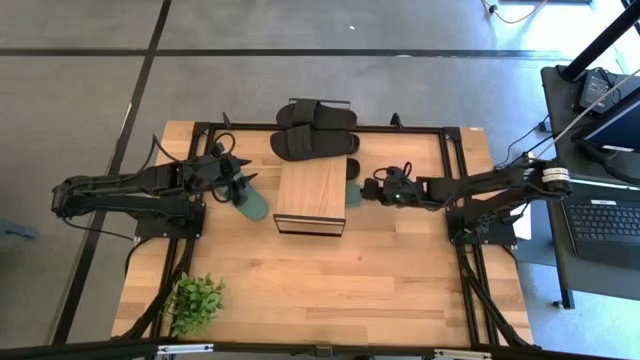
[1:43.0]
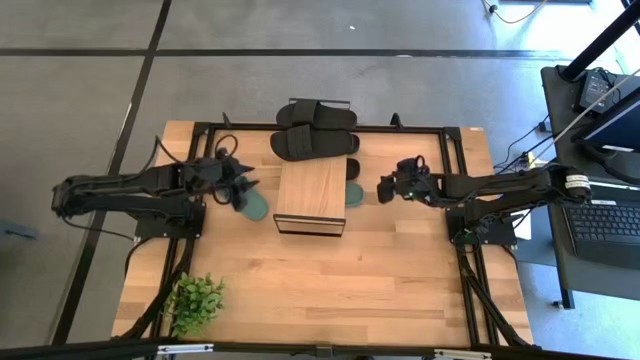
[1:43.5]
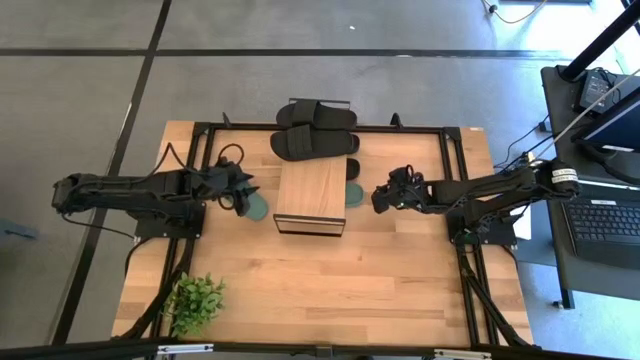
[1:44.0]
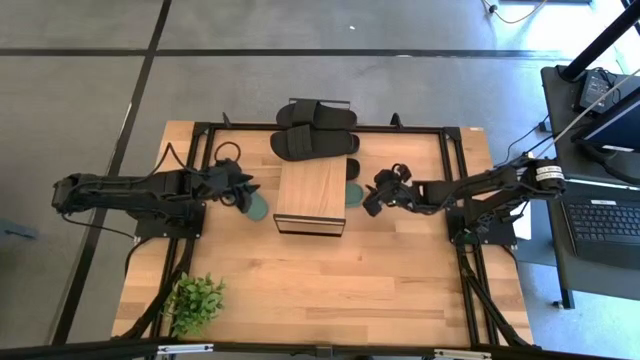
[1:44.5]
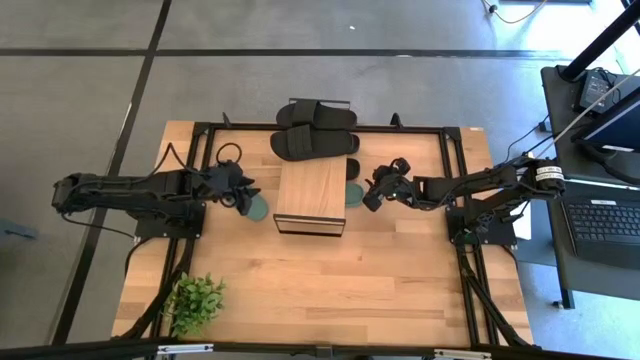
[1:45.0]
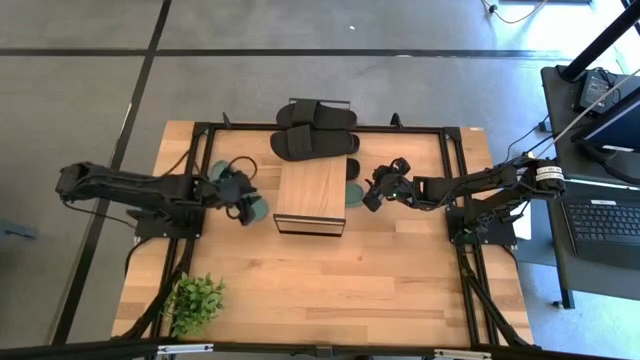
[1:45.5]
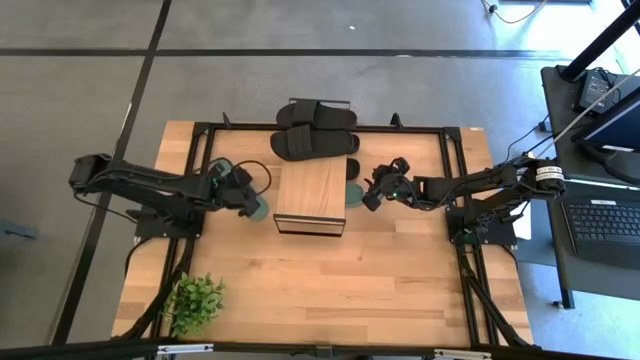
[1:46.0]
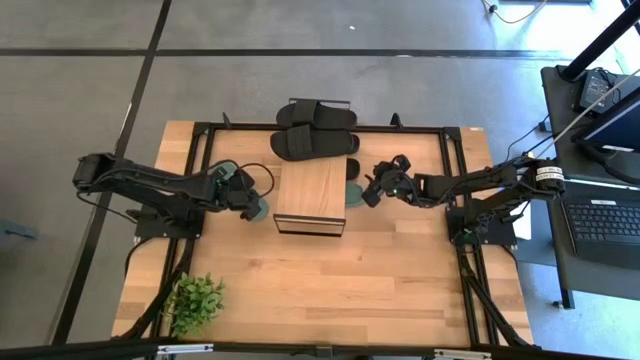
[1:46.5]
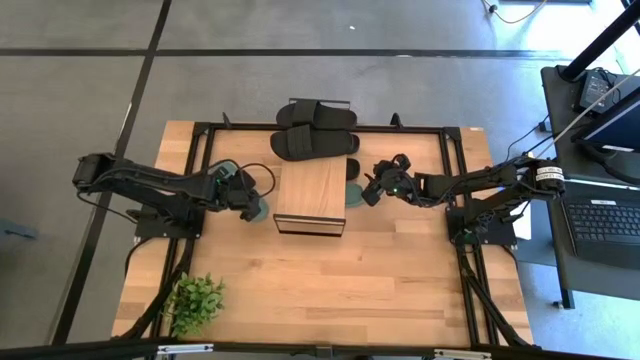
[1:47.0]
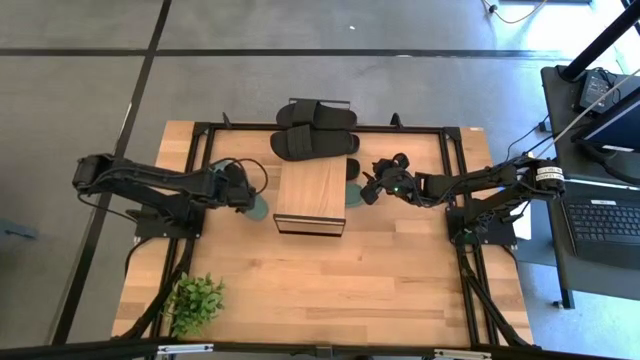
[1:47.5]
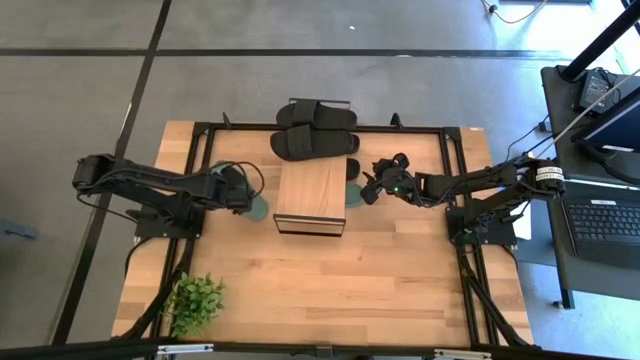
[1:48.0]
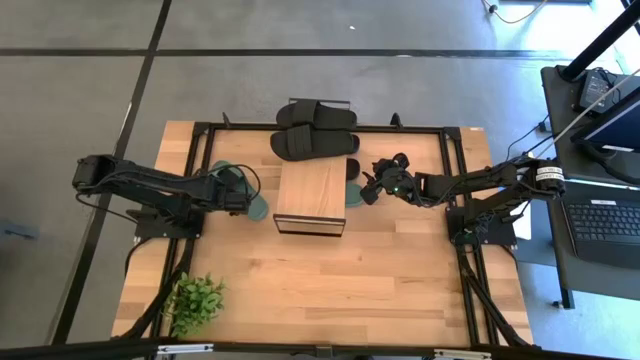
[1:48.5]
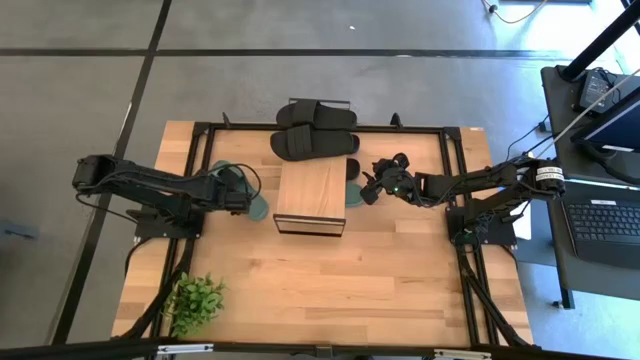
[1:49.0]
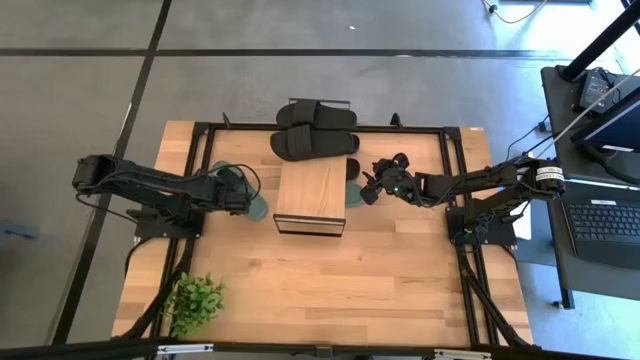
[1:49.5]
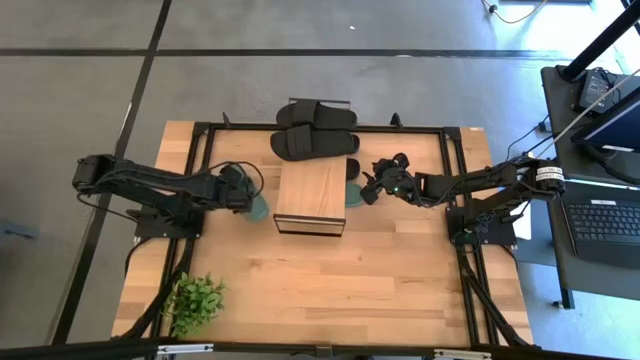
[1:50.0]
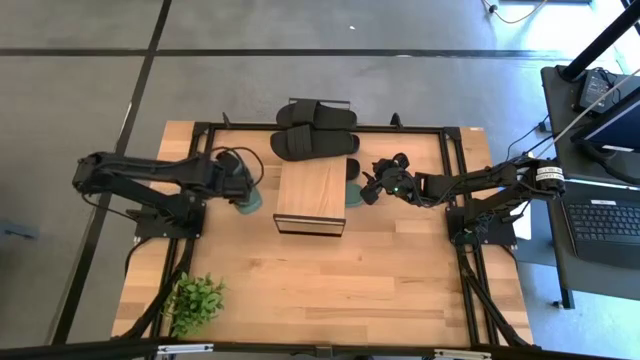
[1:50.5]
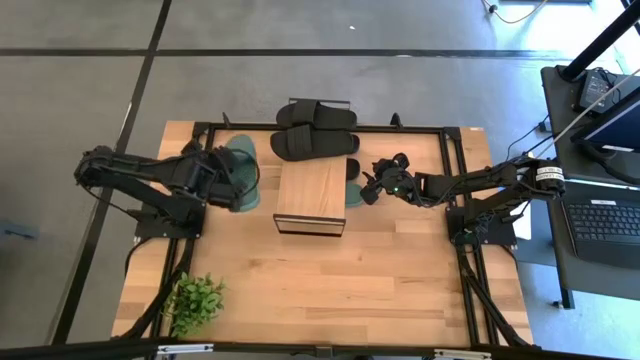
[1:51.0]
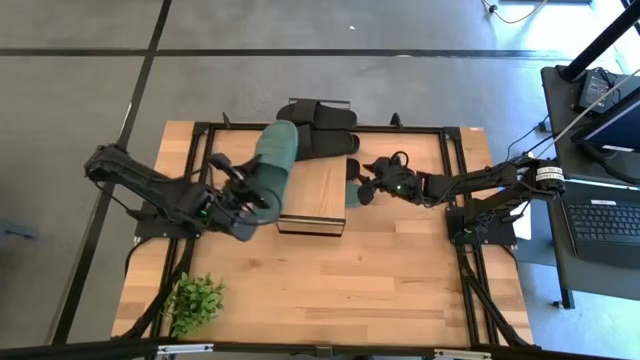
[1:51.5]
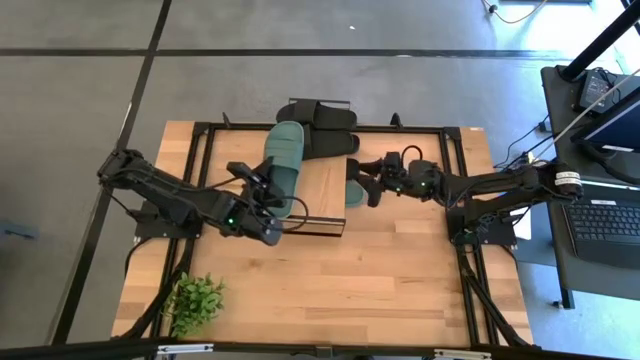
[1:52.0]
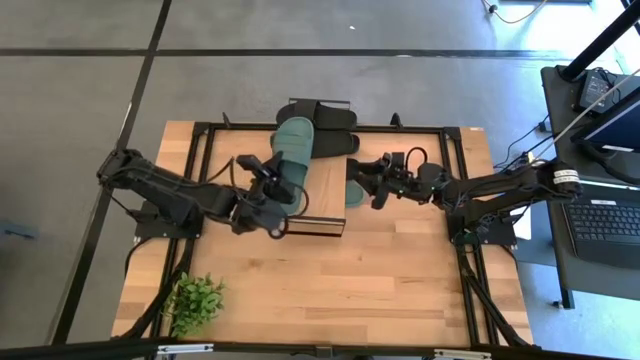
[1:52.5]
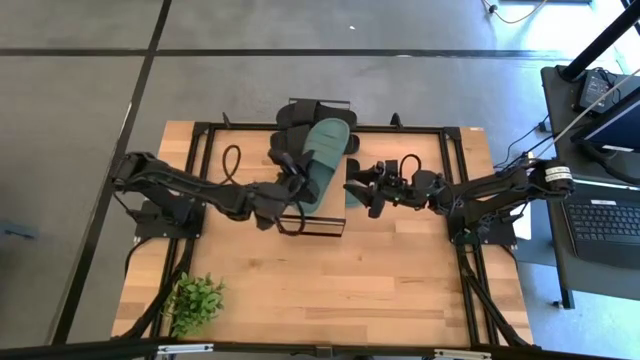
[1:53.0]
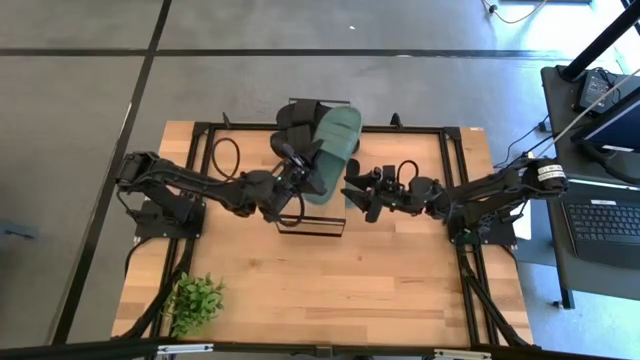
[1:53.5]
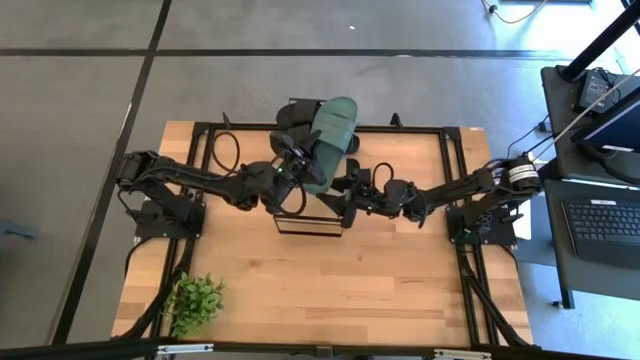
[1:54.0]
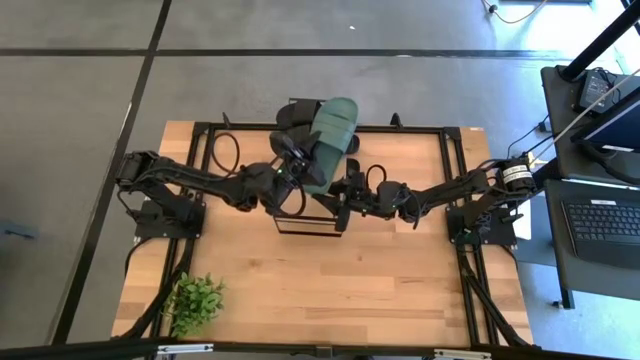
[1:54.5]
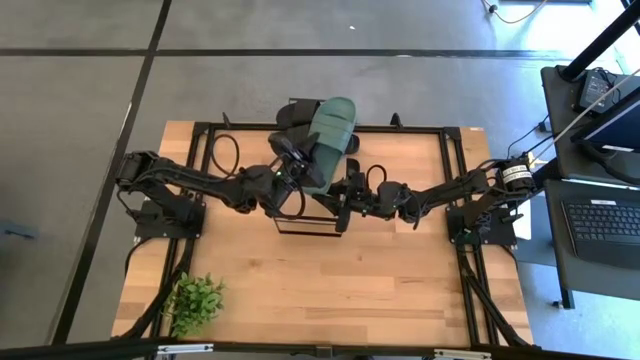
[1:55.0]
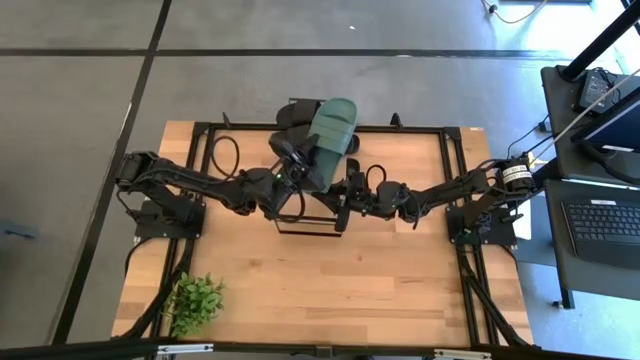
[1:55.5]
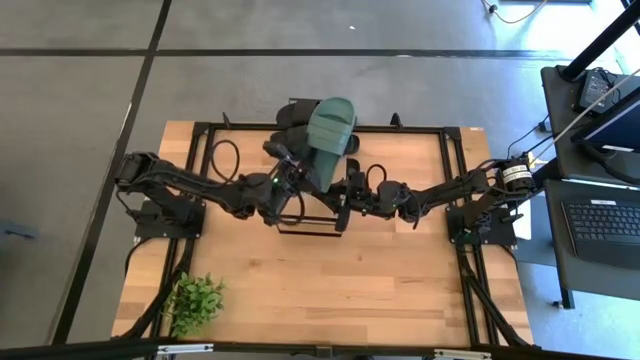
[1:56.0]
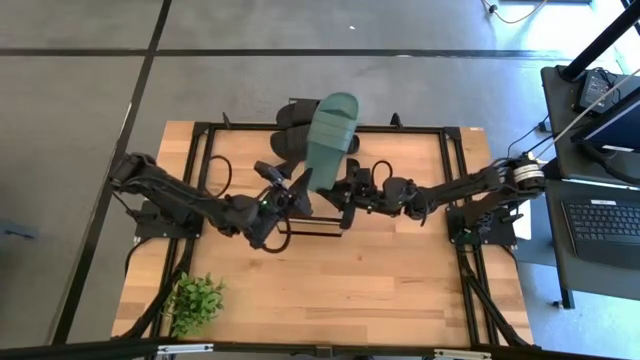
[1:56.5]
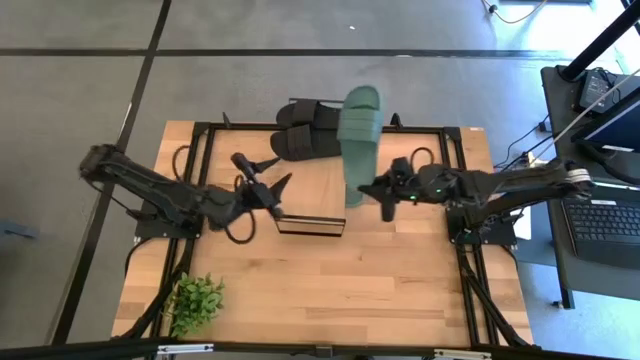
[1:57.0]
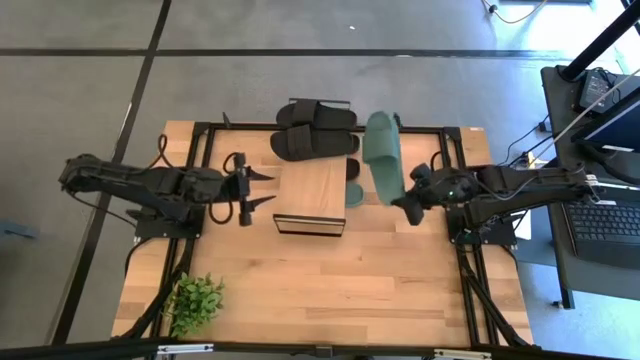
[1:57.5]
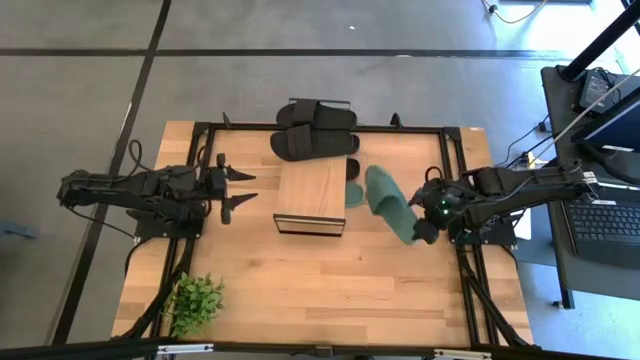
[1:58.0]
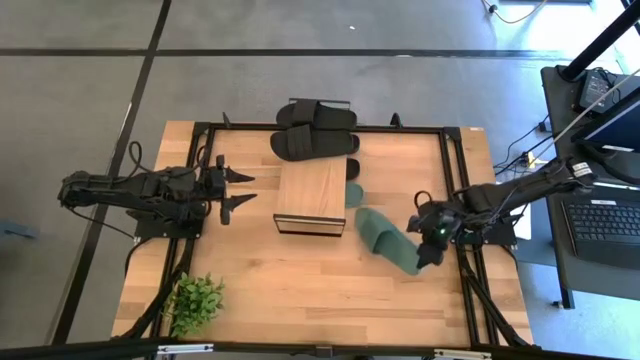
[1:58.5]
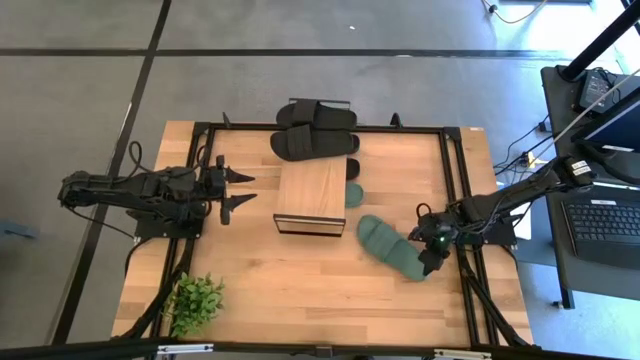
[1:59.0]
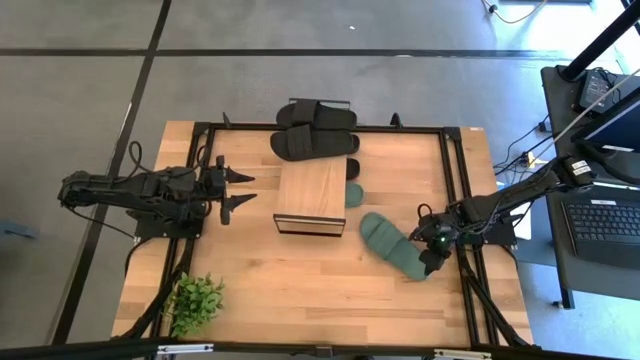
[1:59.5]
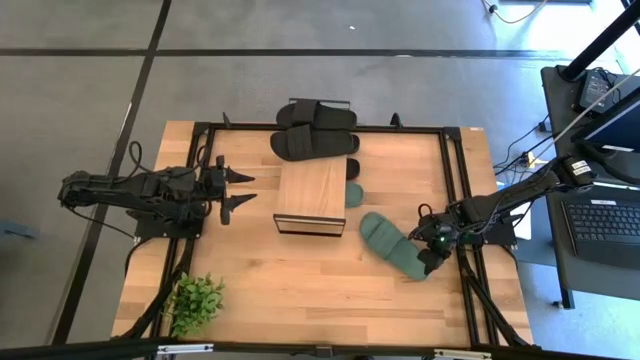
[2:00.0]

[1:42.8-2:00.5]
Task: Pick and place slides into the shelf
Put the green slipper under the shelf

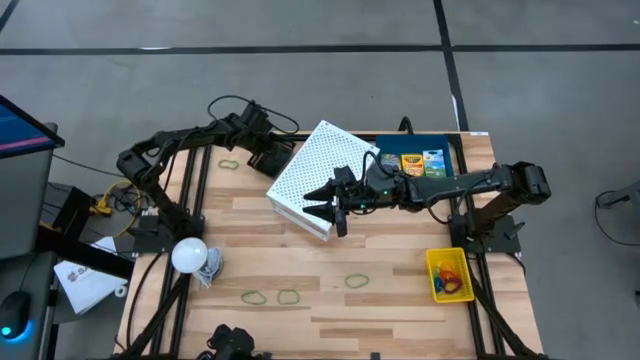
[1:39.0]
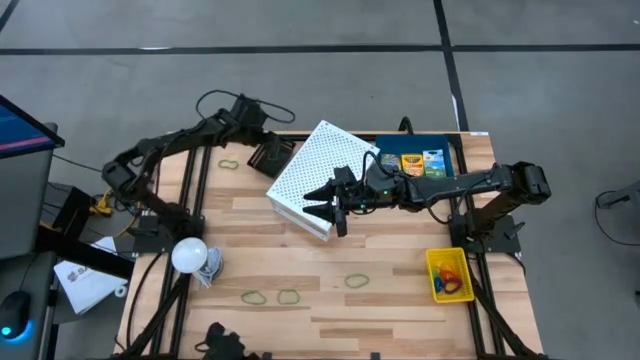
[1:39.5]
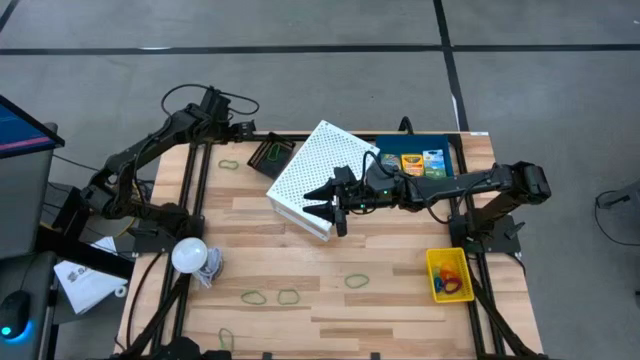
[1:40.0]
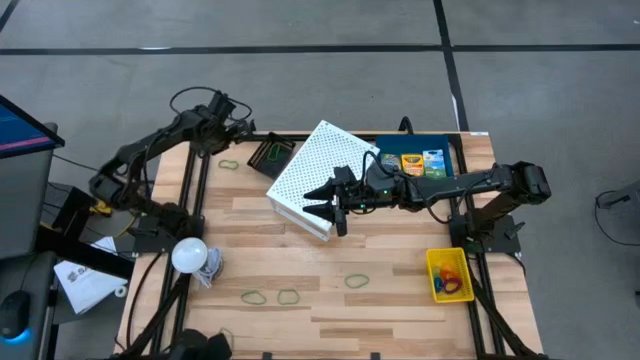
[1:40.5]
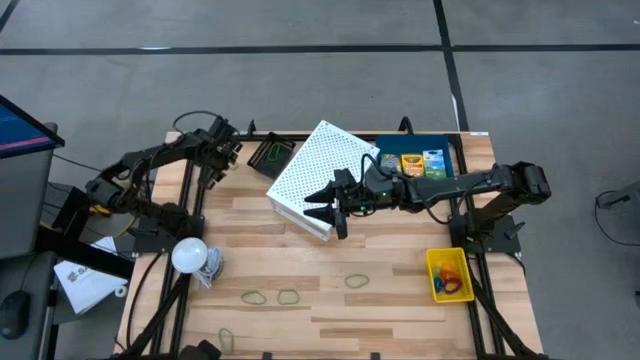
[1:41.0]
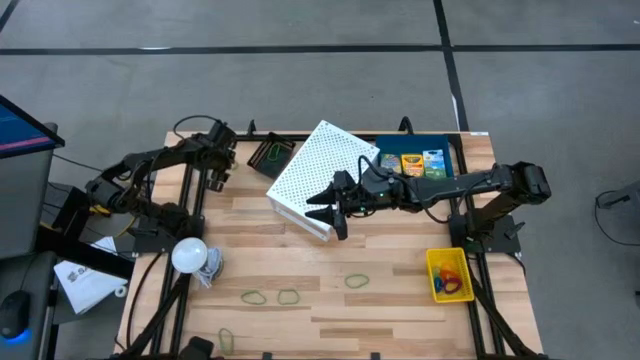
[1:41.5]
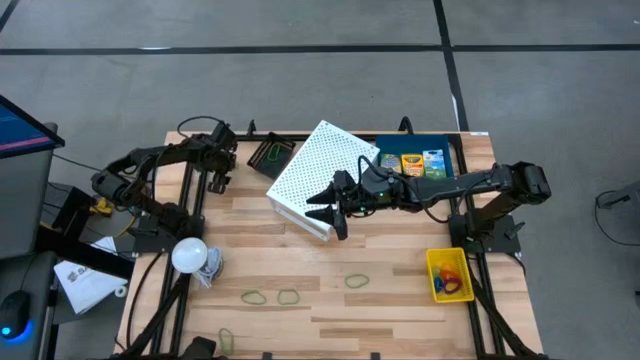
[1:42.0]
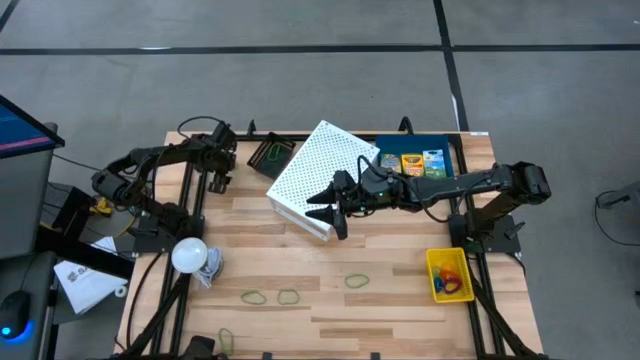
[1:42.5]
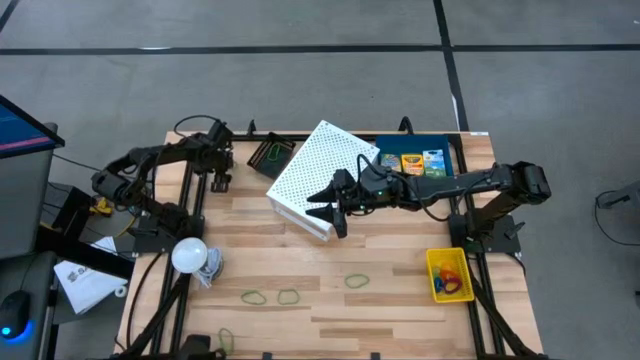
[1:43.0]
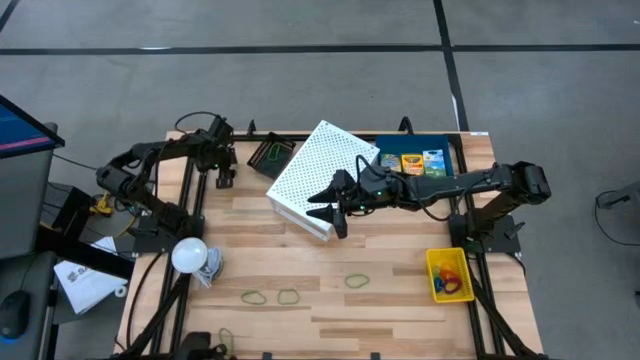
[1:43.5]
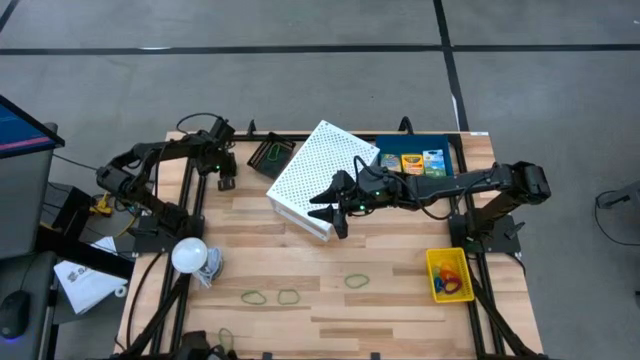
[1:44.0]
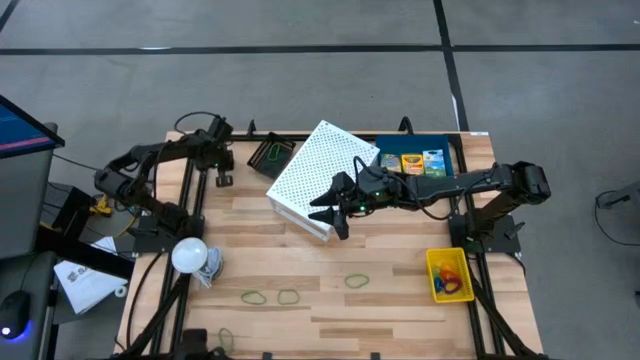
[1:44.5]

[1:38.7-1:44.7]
Task: Pick & Place Office Desk Supplies
Put the green rubber band into the black bin
